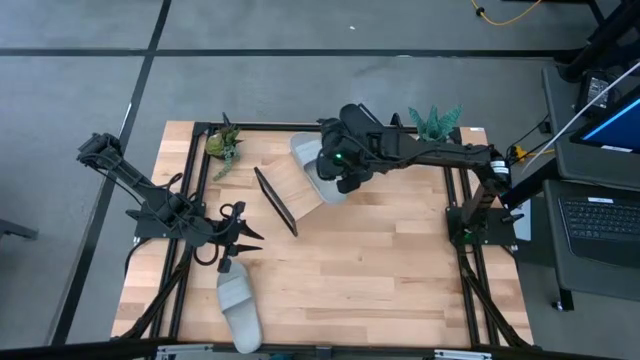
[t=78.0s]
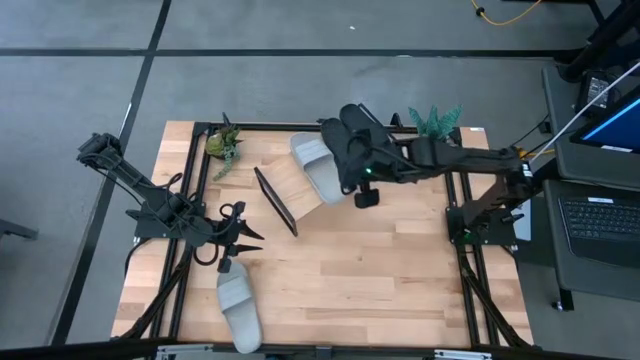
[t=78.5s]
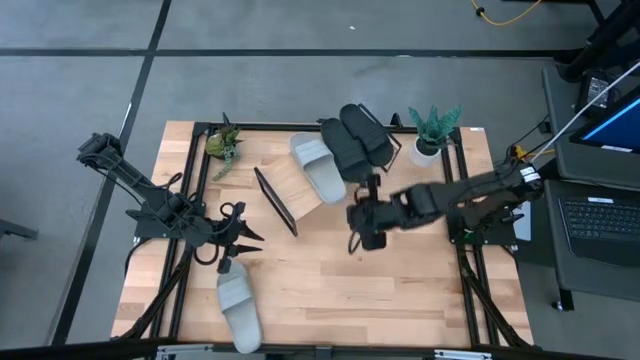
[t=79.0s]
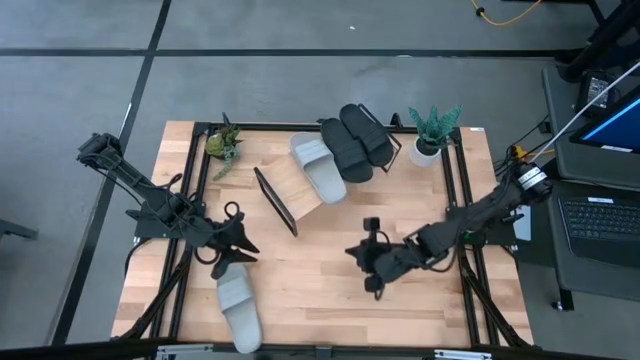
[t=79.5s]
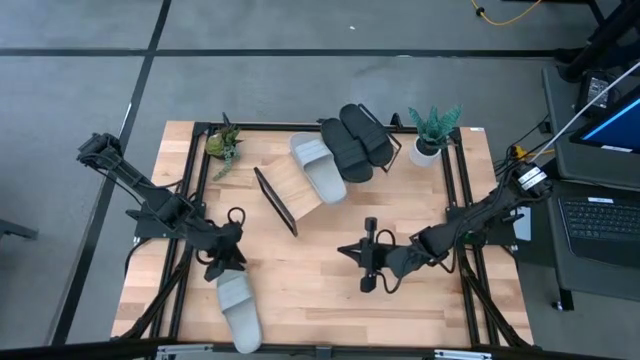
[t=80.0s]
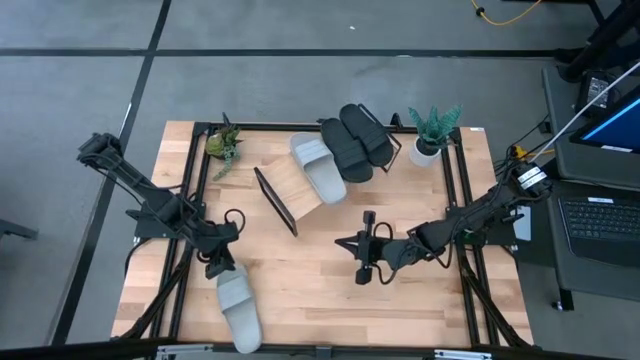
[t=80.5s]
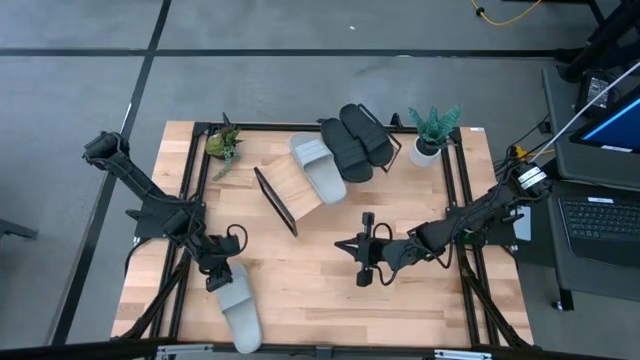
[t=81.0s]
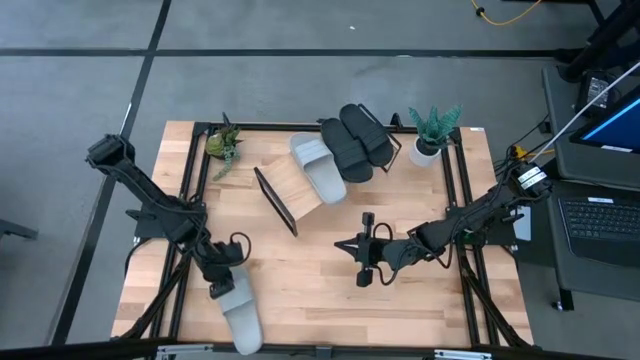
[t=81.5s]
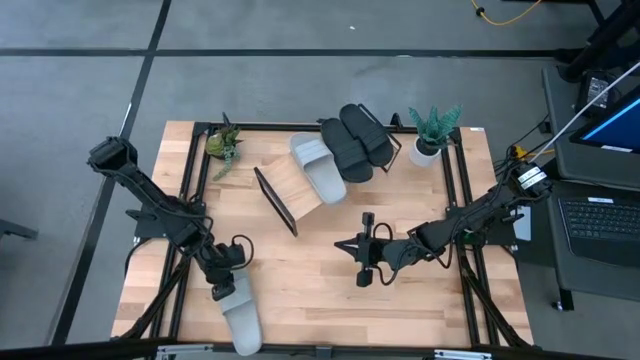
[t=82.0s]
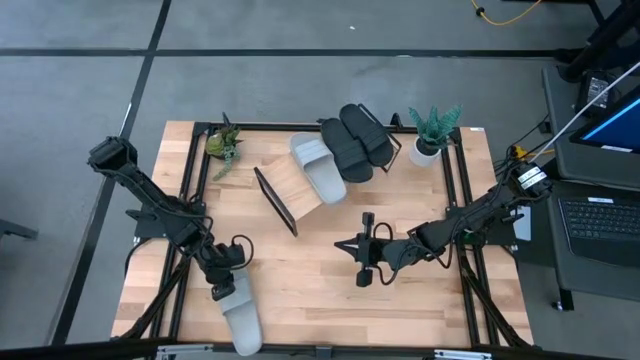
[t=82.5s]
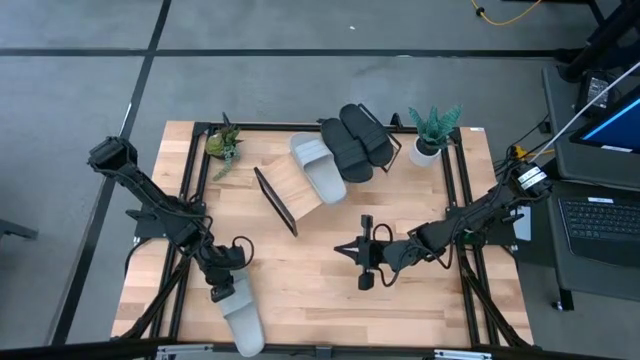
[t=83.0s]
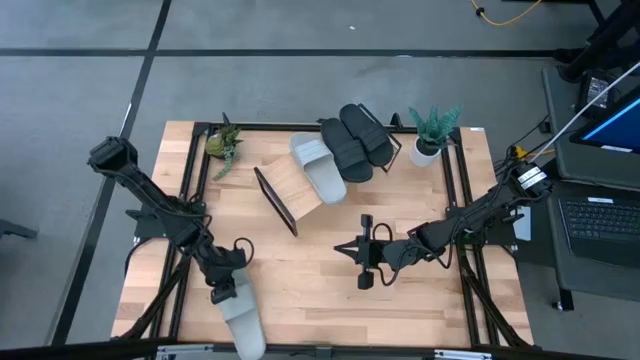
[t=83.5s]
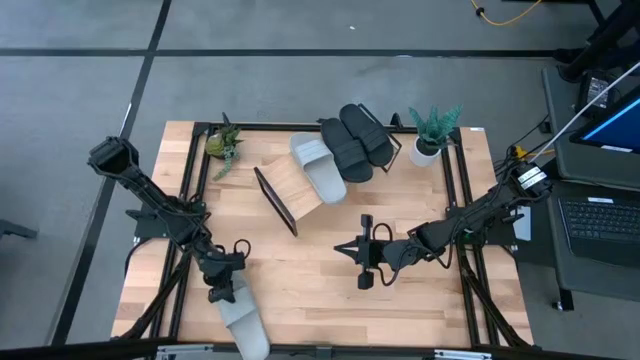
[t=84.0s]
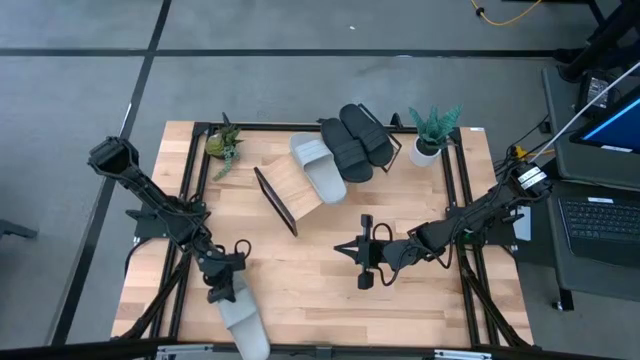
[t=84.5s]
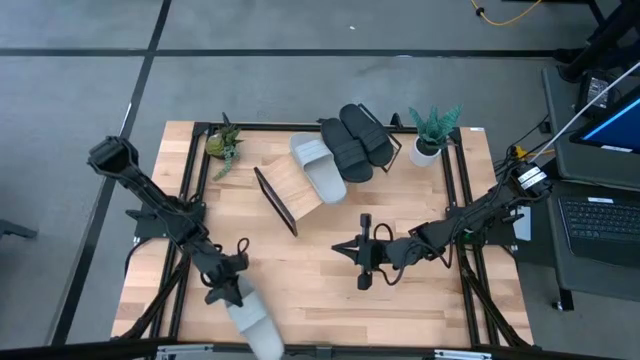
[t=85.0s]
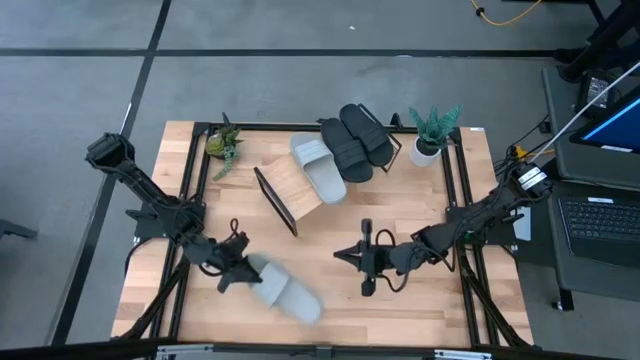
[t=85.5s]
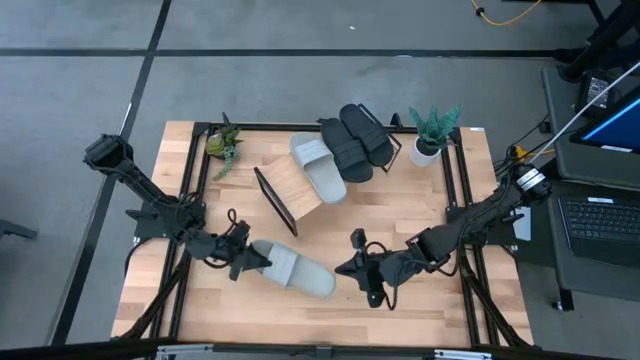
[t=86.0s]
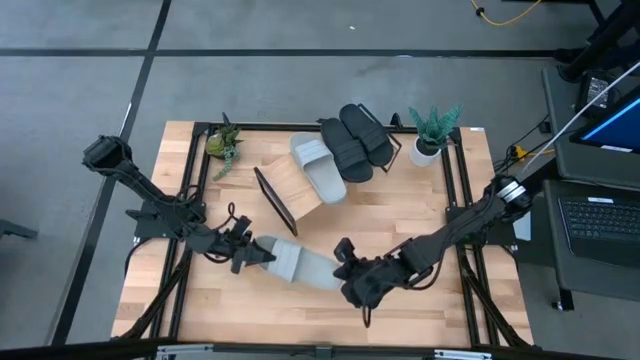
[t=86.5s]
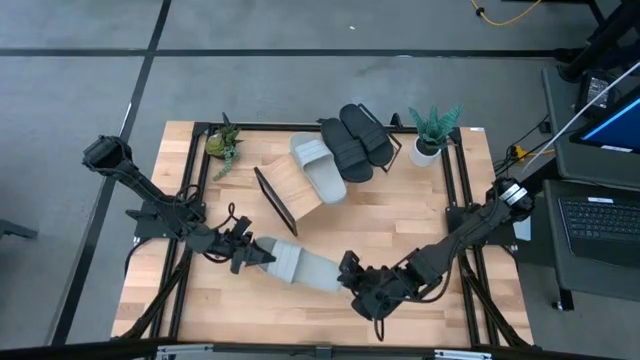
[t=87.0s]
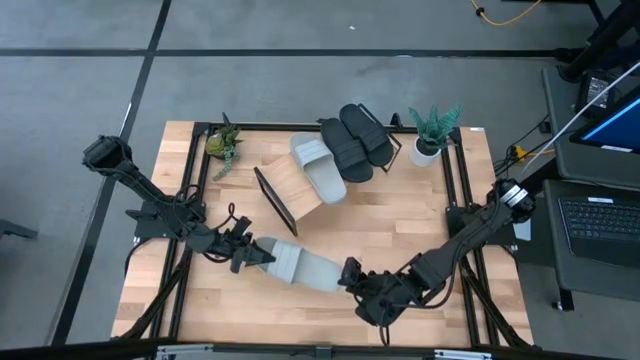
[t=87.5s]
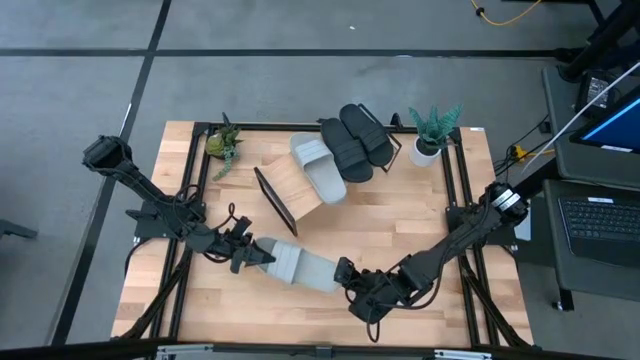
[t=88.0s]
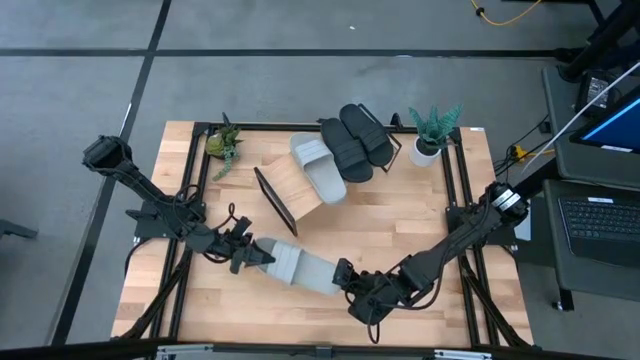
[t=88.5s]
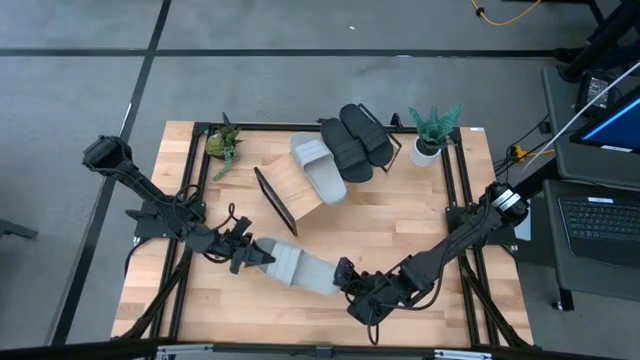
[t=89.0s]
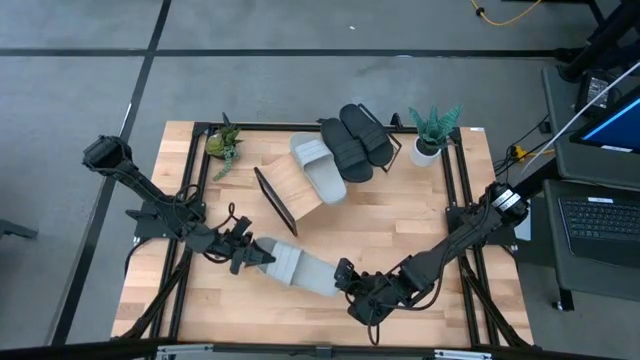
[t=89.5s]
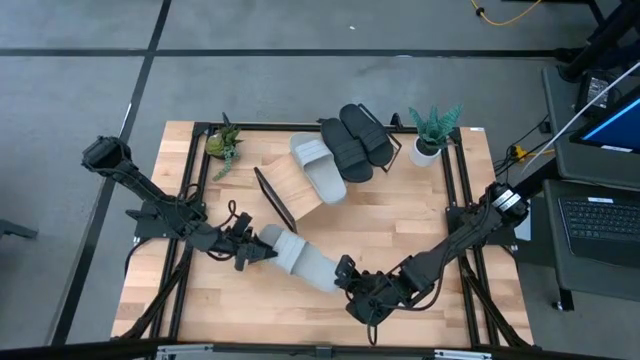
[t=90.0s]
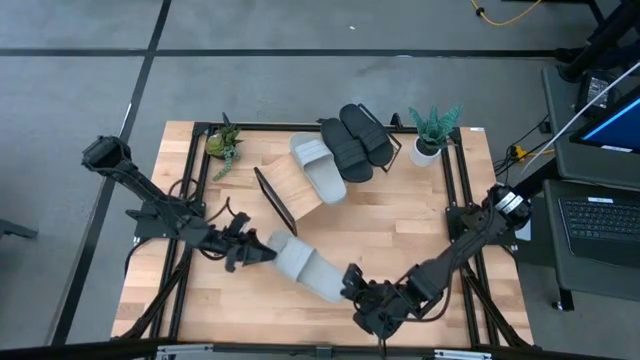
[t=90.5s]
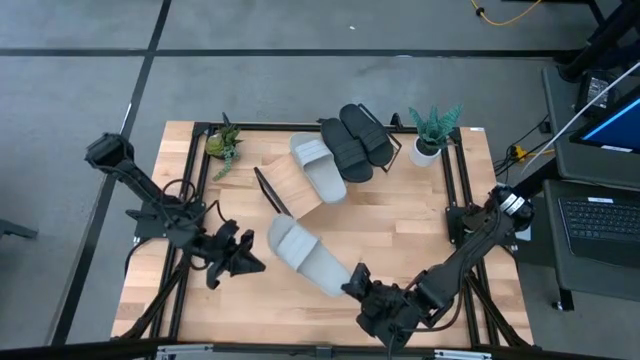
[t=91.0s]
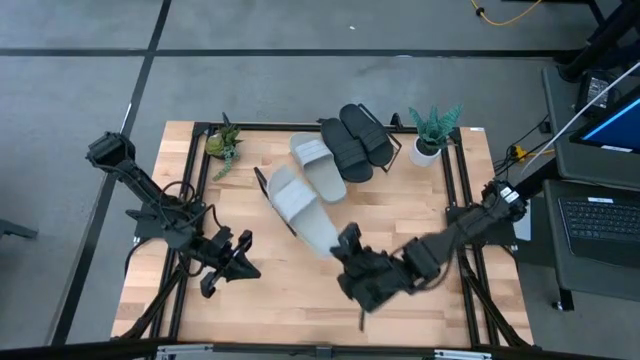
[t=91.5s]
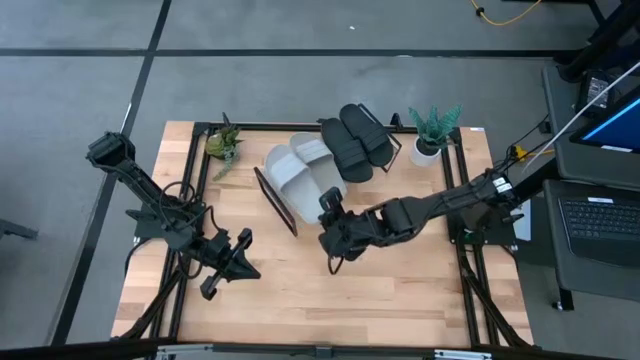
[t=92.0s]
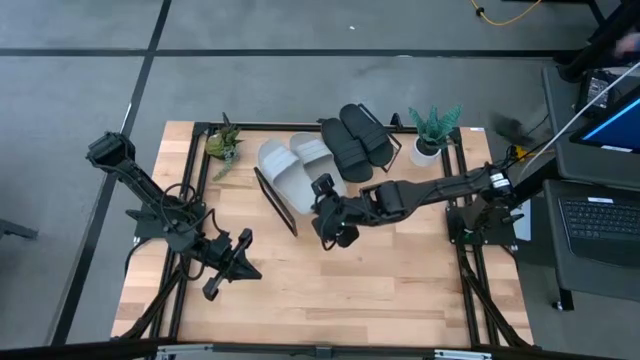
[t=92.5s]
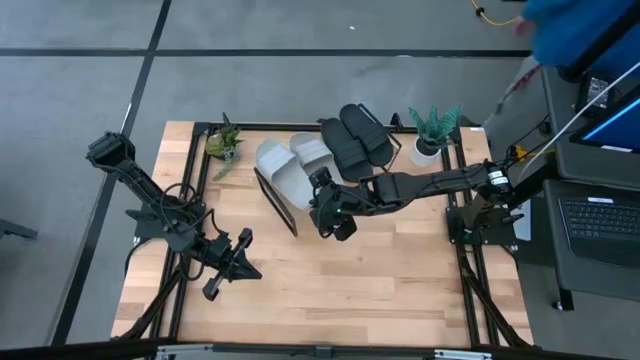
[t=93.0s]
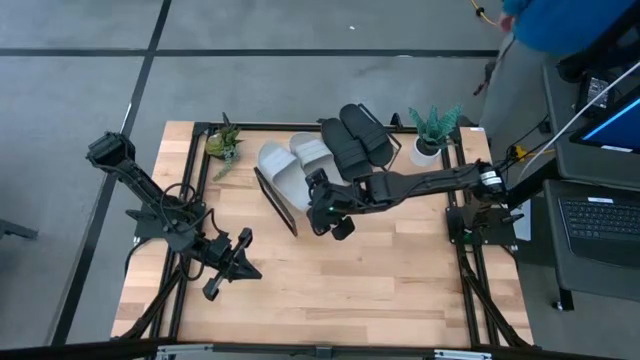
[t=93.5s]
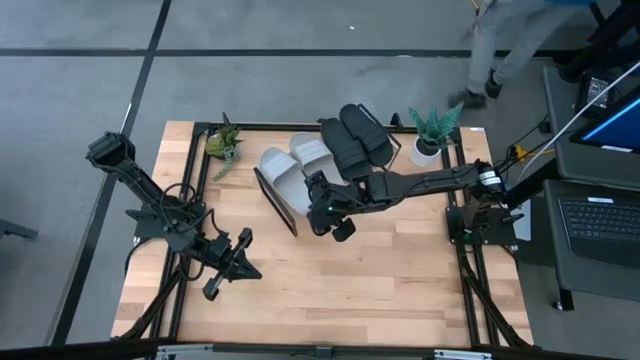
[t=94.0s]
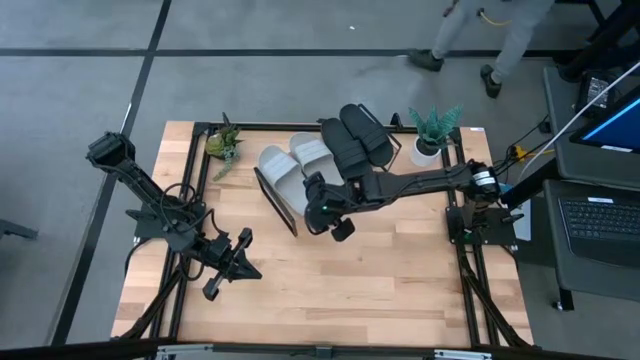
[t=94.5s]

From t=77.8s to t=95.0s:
Task: Pick and place slides into the shelf
Put the gray slipper on the shelf

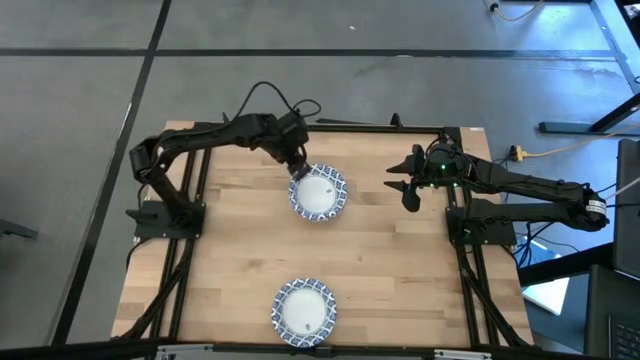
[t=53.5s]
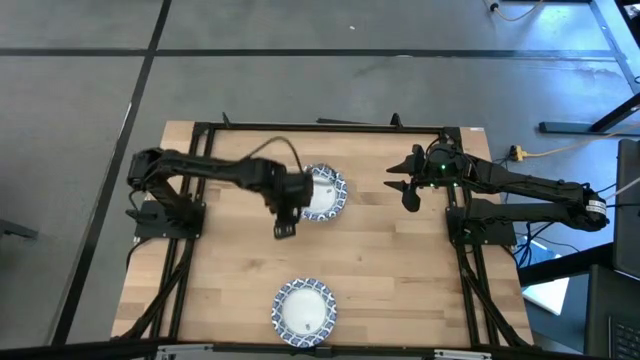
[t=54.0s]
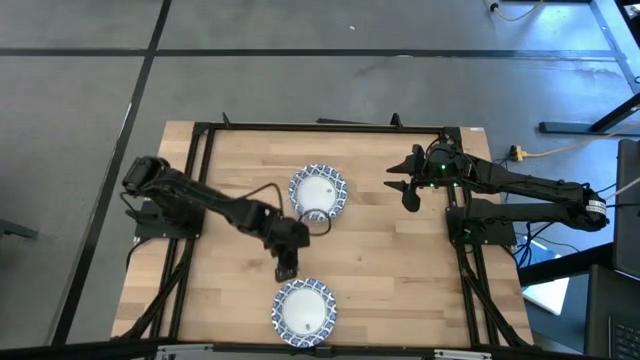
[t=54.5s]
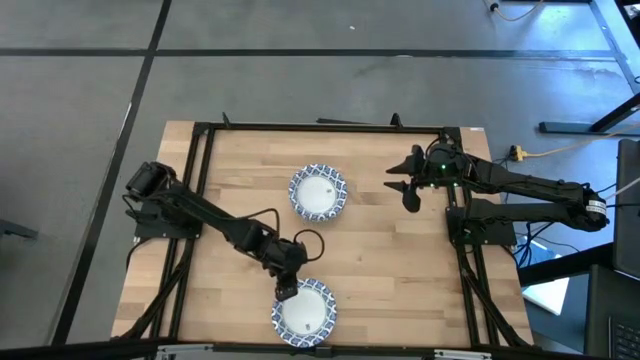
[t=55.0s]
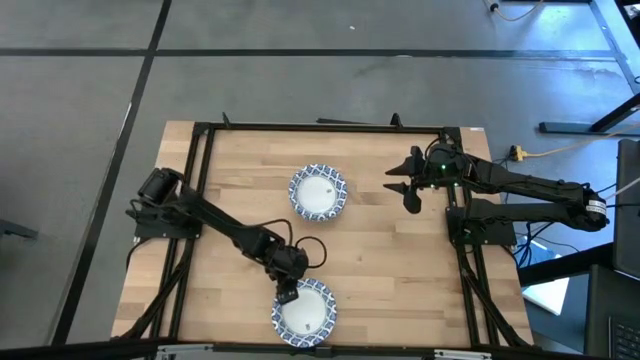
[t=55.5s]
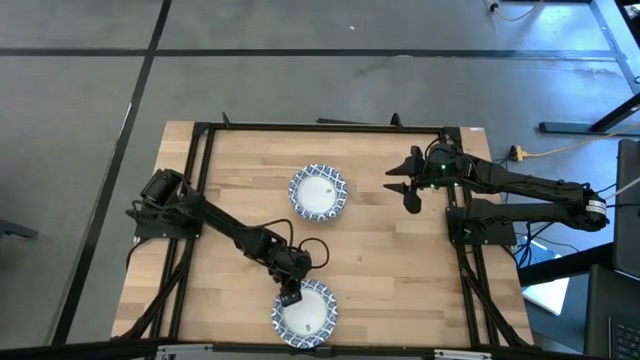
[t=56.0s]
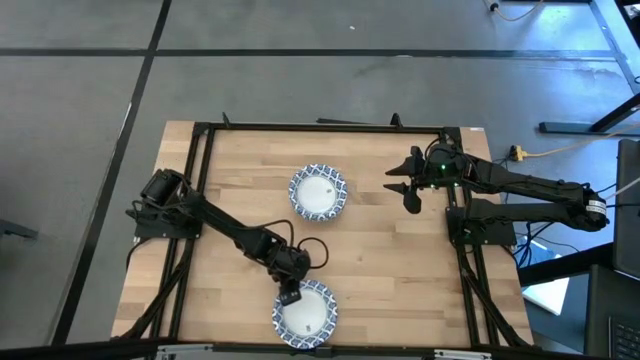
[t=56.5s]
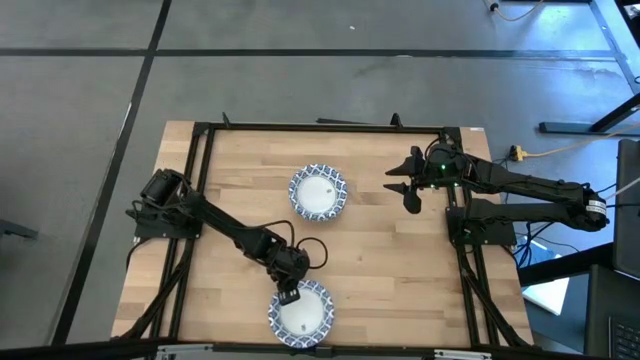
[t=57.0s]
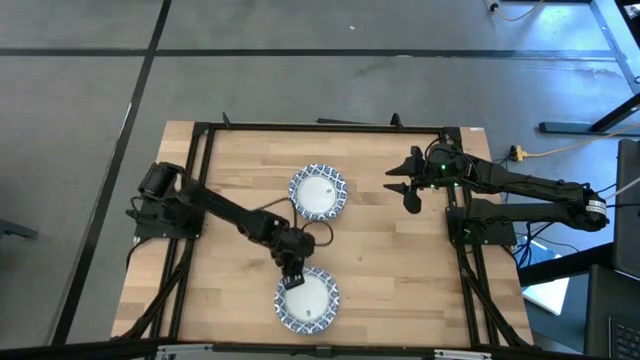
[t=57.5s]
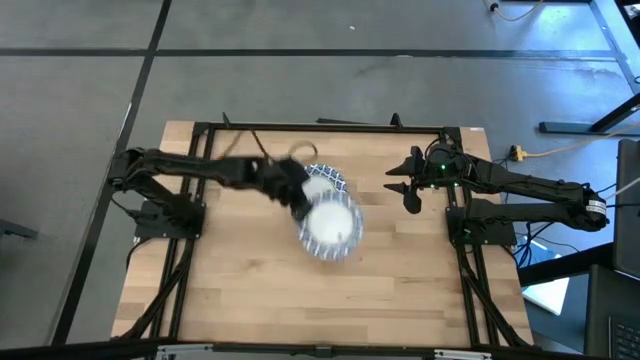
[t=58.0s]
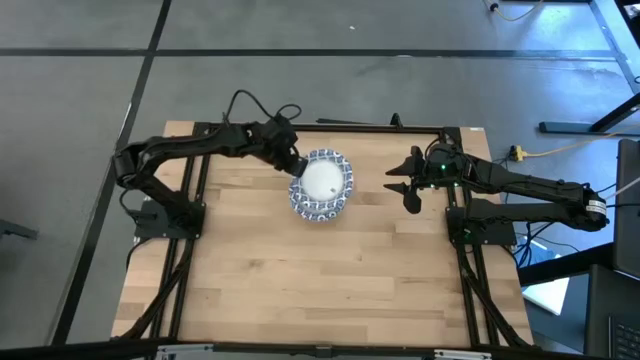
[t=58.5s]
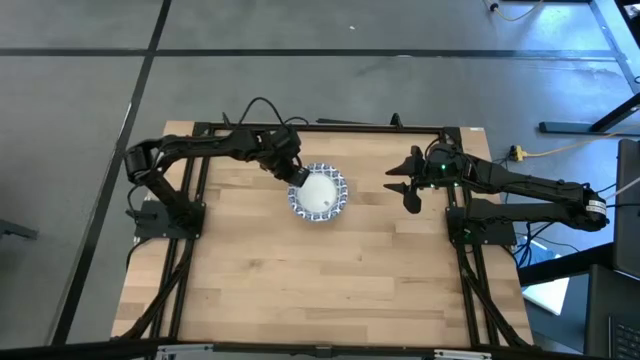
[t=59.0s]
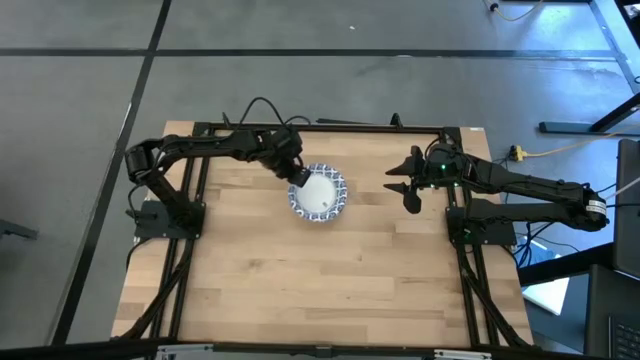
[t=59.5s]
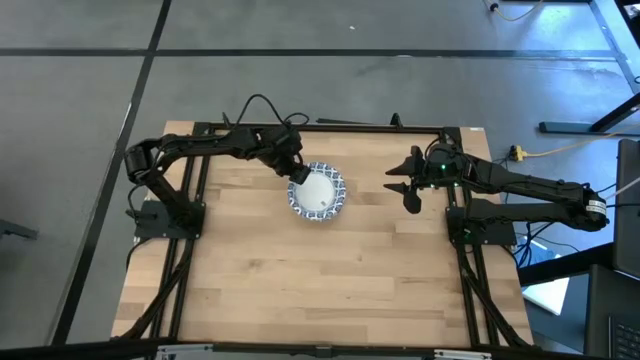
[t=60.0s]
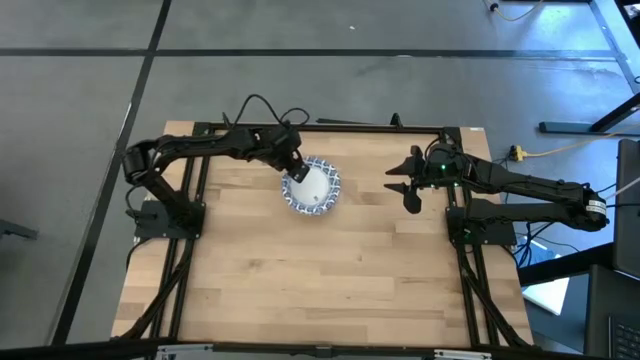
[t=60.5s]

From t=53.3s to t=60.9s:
Task: Nest bowls inside each other
Stack the blue patterned bowl on the stacked blue patterned bowls
